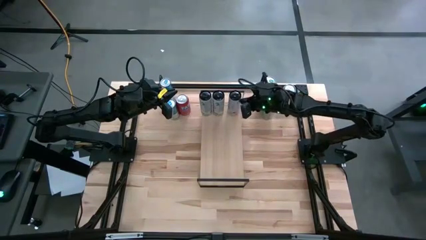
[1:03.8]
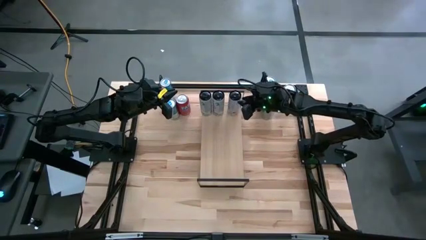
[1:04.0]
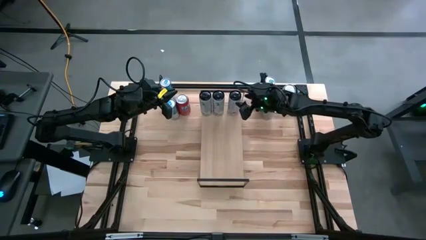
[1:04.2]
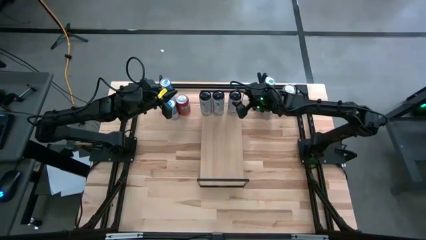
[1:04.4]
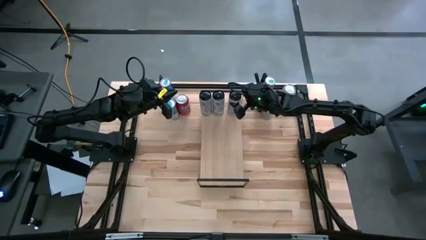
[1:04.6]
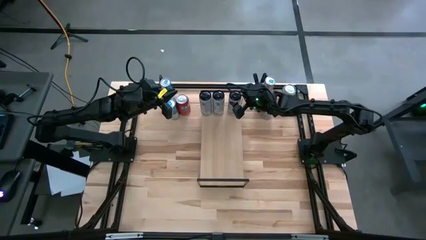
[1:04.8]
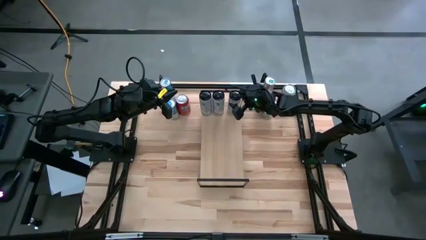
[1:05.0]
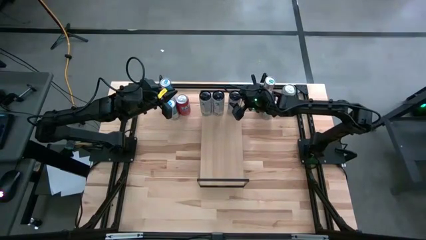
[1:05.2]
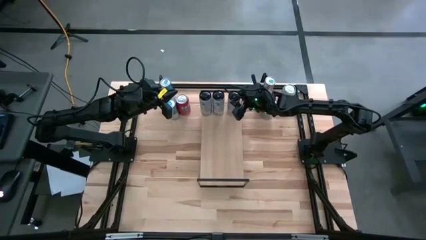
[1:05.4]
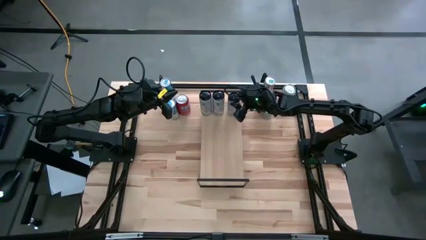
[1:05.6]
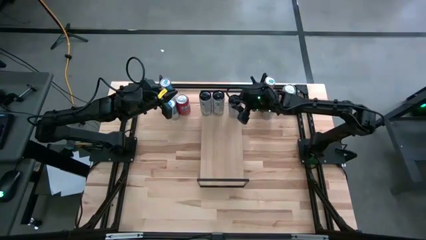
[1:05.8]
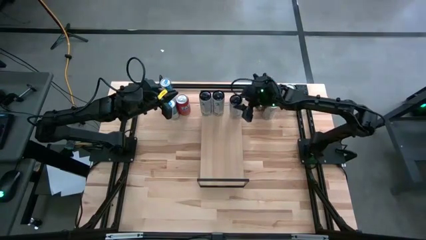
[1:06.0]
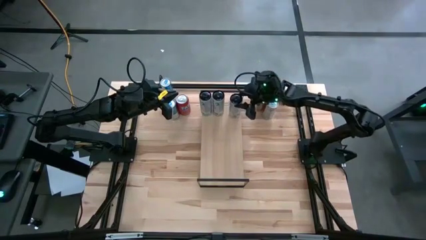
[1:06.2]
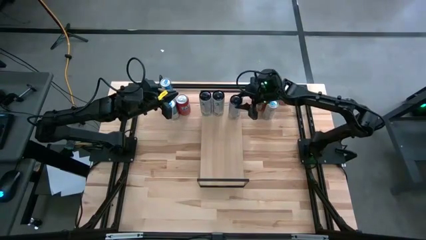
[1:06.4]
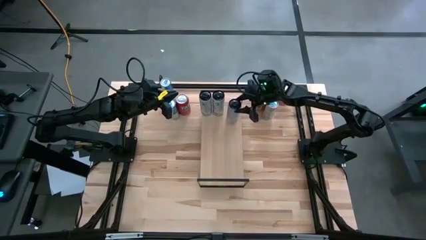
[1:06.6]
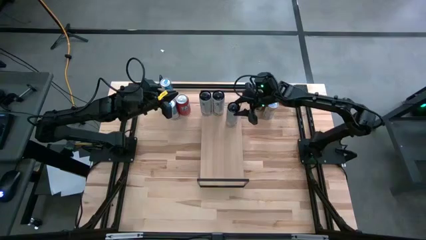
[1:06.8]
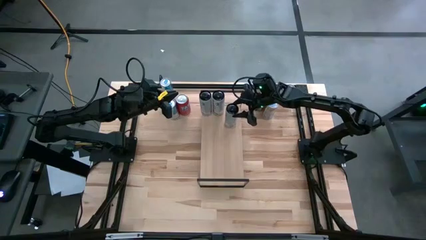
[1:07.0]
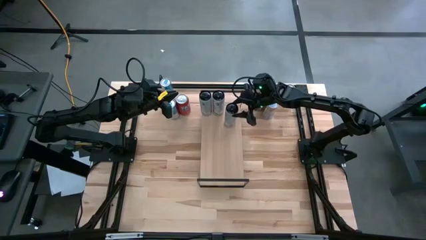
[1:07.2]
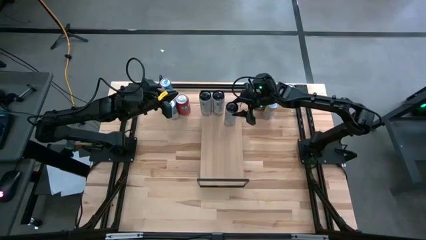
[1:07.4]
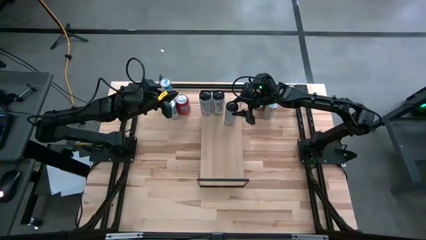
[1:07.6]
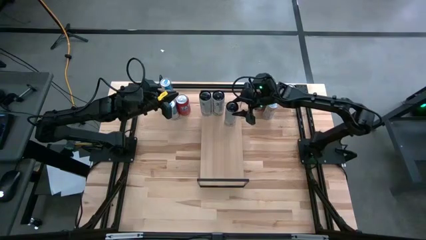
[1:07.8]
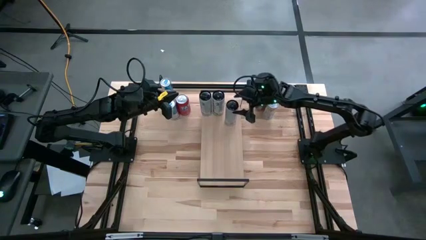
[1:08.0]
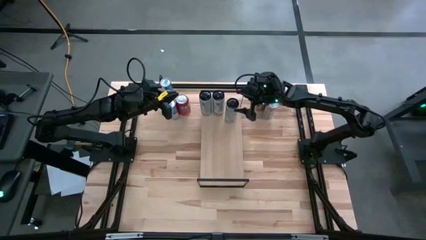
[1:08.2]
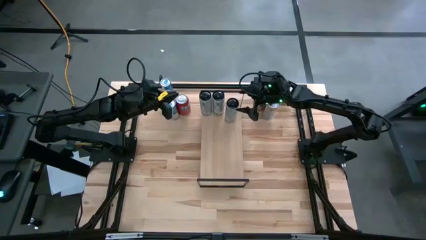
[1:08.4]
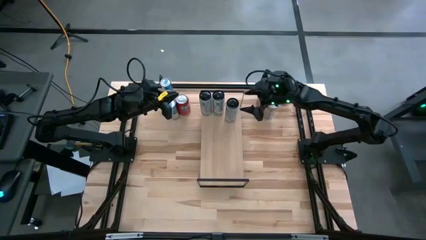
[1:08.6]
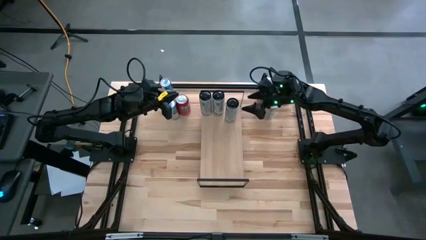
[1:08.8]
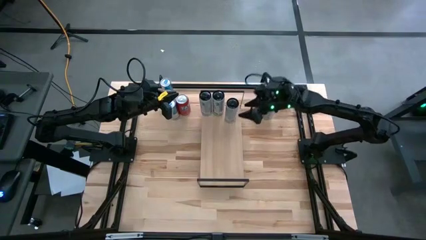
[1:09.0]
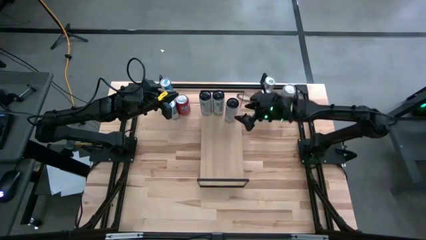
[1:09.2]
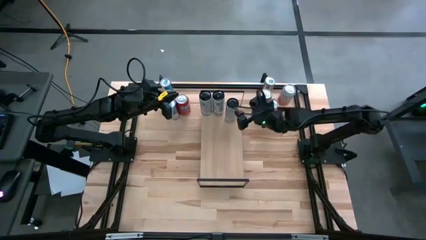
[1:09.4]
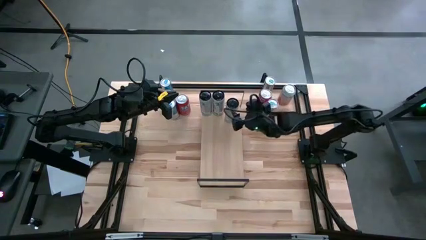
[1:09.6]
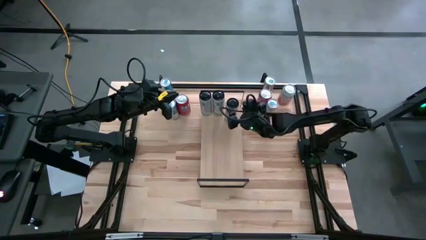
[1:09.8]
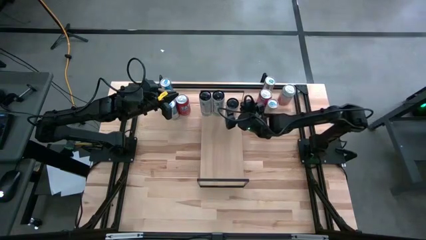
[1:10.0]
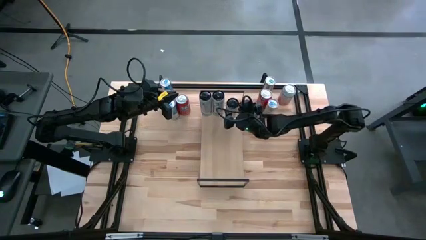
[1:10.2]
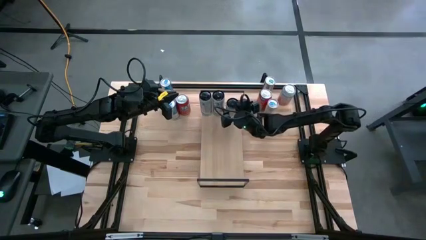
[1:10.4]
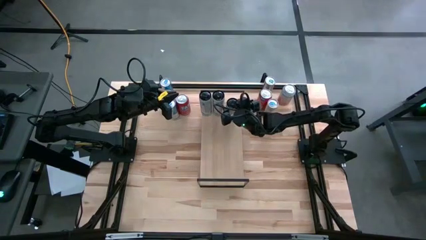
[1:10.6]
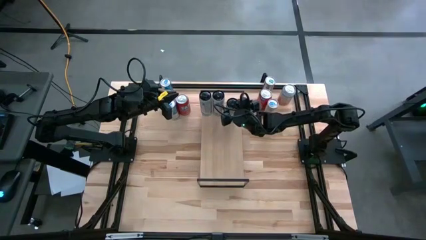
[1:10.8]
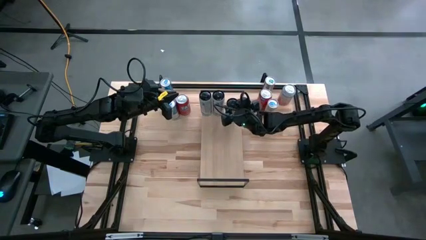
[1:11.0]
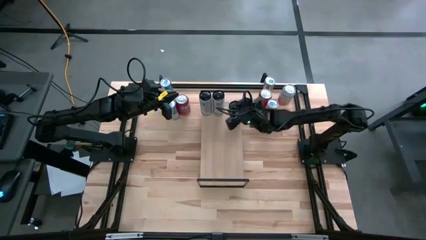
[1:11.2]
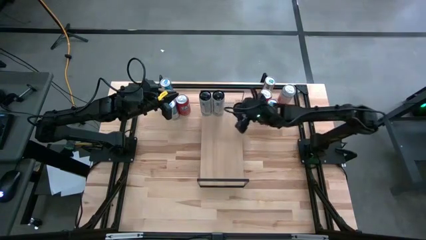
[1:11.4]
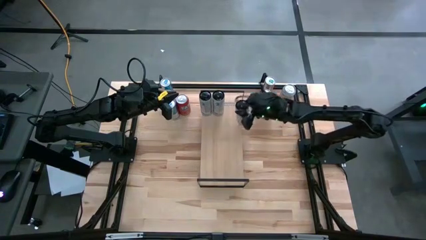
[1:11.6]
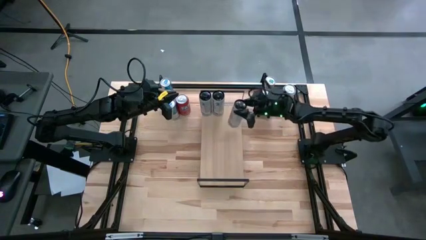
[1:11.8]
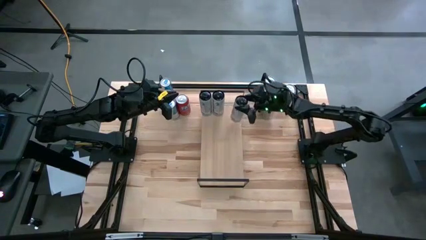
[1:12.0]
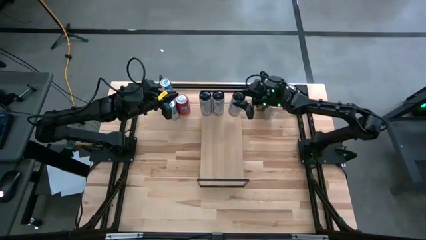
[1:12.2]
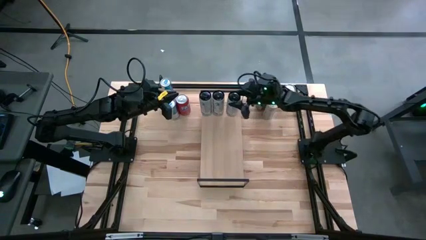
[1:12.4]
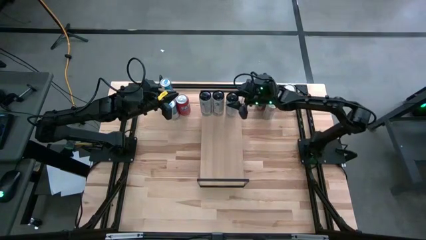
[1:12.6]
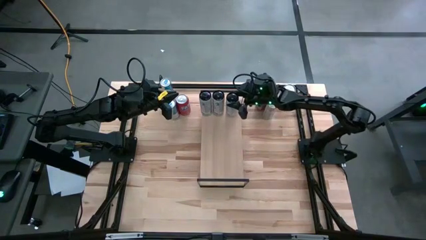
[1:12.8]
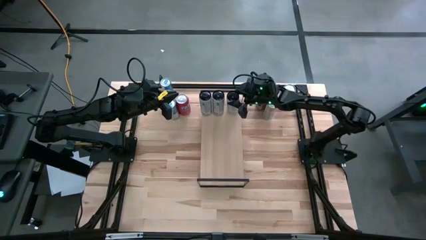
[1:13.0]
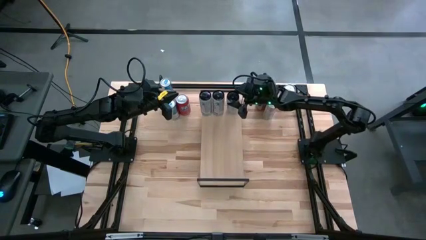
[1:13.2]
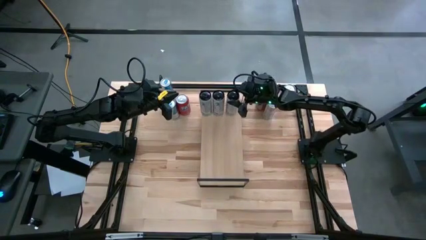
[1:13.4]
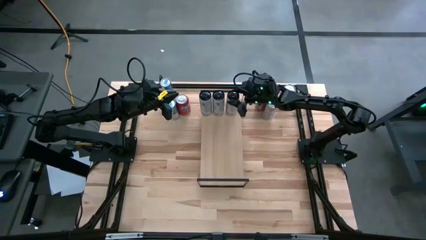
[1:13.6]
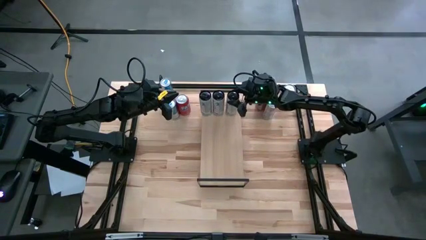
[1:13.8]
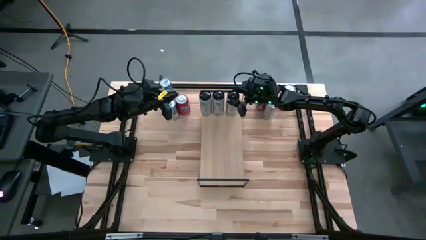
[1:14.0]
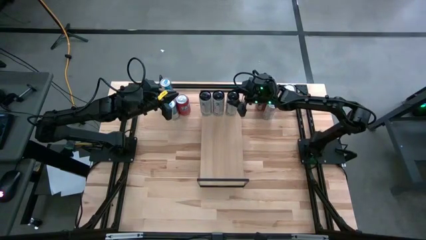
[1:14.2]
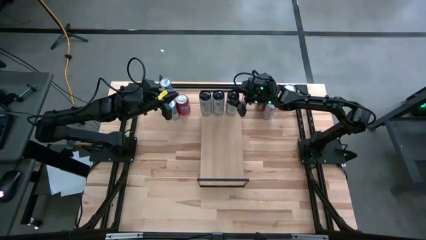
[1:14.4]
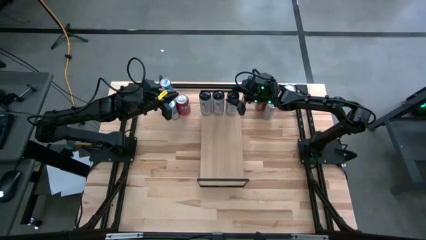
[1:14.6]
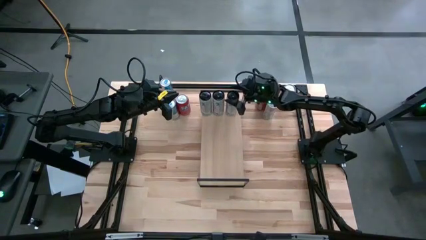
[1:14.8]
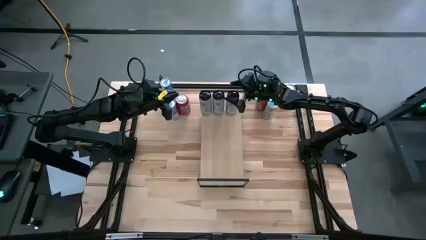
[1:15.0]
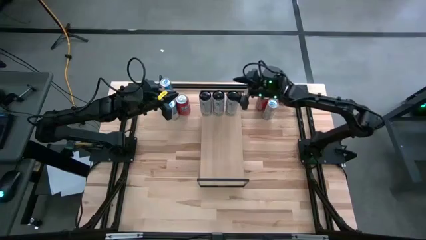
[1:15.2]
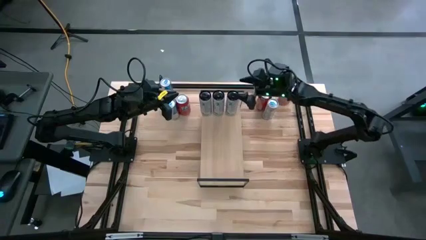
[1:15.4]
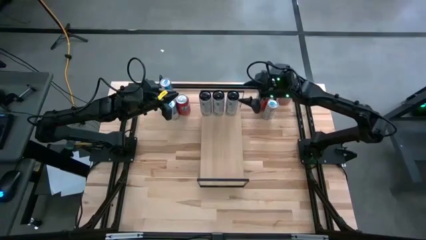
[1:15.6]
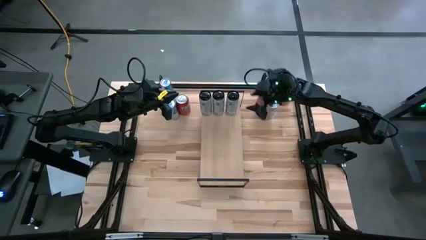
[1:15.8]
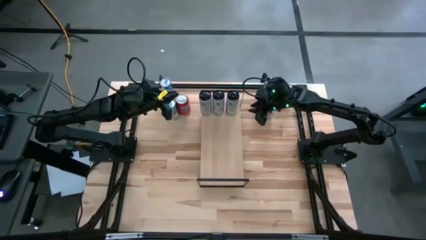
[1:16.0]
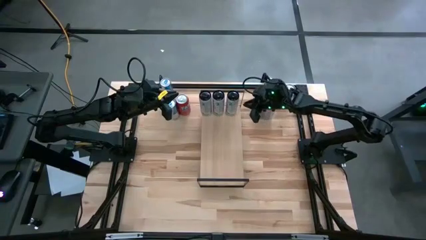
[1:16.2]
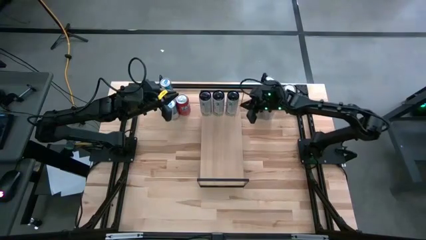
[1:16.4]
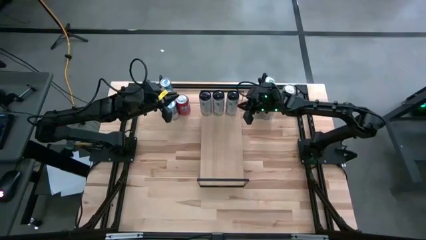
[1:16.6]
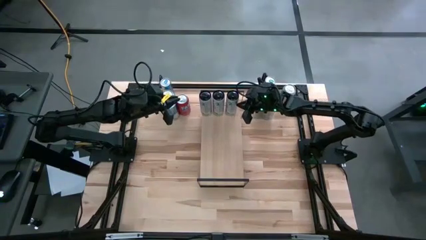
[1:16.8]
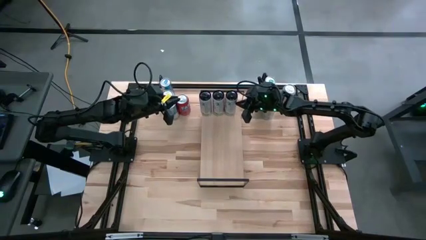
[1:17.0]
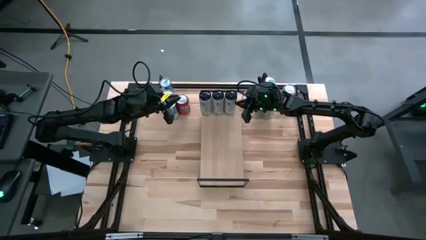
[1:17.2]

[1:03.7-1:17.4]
Task: Place canned beverage on shelf
Put the white-pink soda can on the shelf aligned with the other white-pink soda can

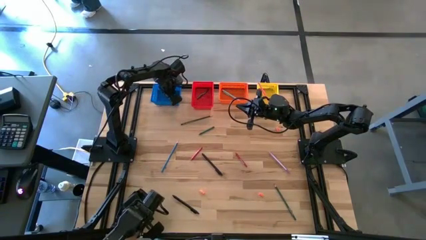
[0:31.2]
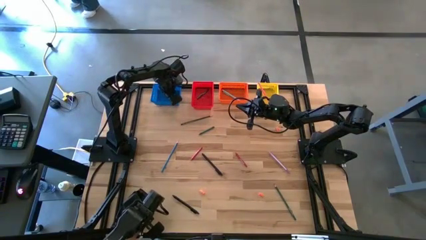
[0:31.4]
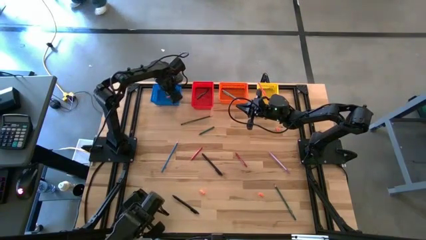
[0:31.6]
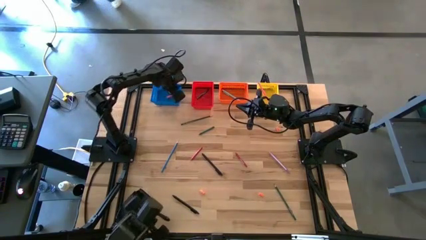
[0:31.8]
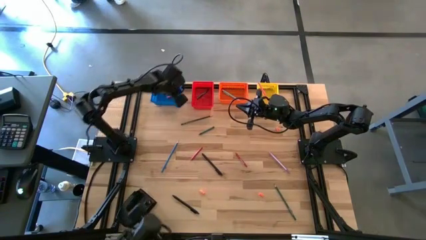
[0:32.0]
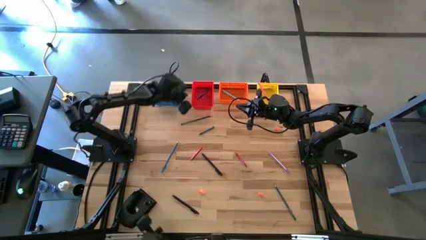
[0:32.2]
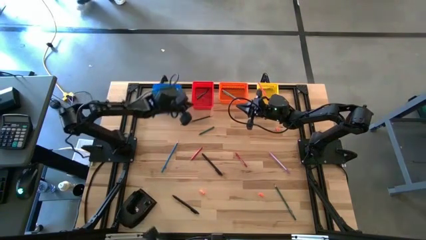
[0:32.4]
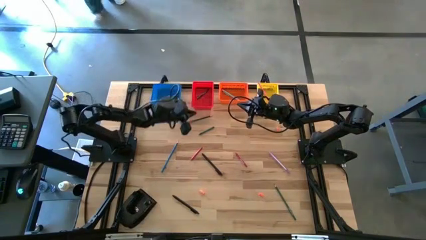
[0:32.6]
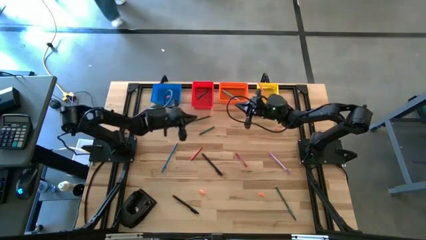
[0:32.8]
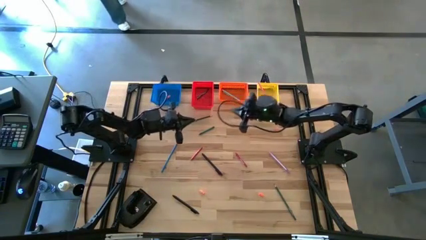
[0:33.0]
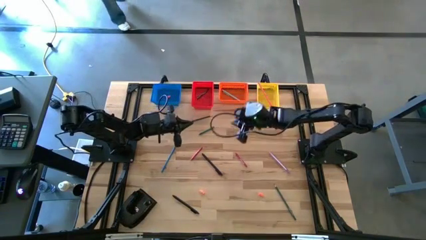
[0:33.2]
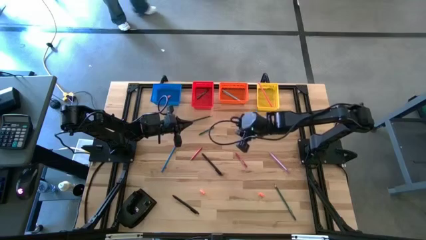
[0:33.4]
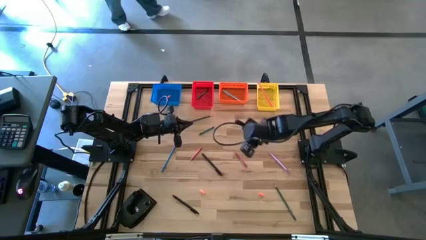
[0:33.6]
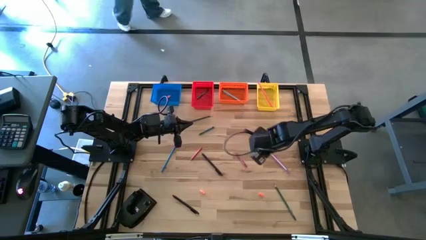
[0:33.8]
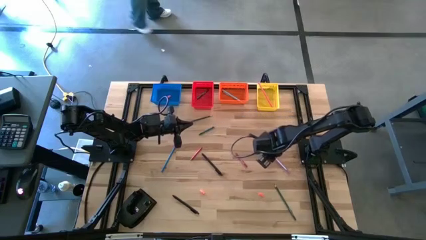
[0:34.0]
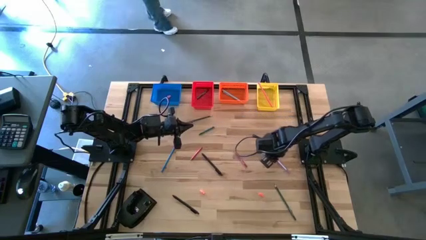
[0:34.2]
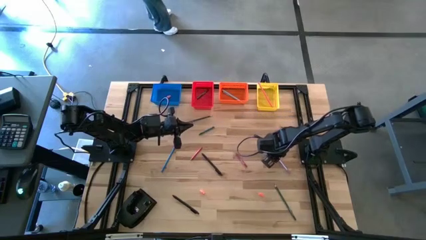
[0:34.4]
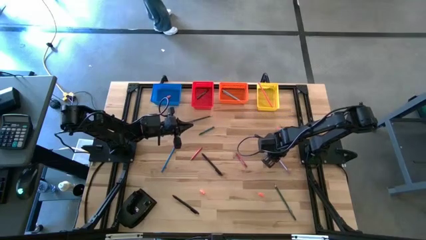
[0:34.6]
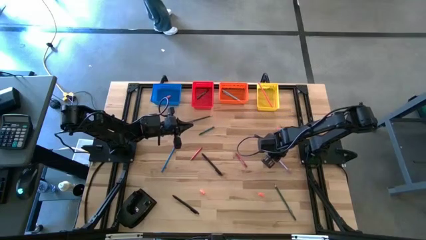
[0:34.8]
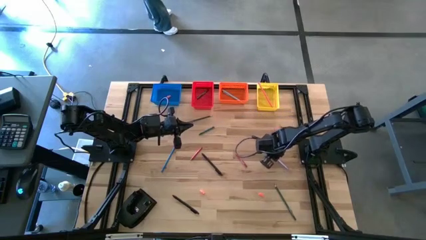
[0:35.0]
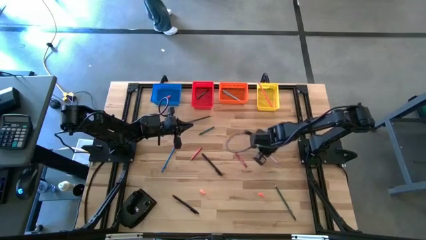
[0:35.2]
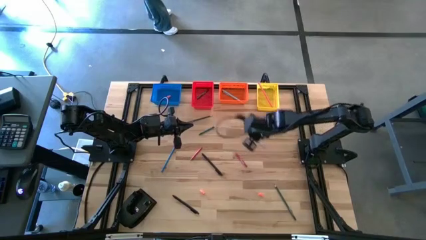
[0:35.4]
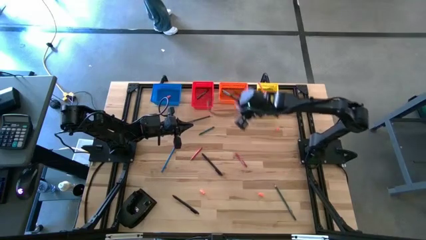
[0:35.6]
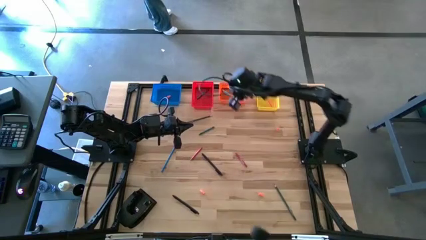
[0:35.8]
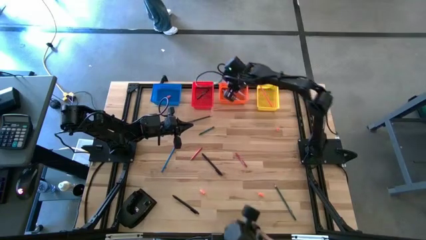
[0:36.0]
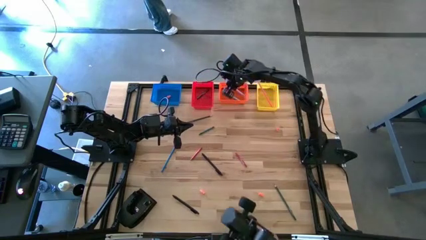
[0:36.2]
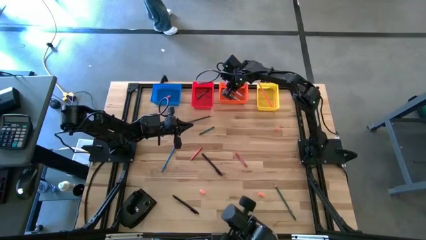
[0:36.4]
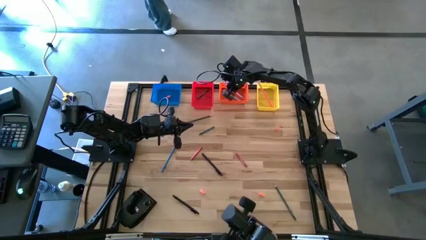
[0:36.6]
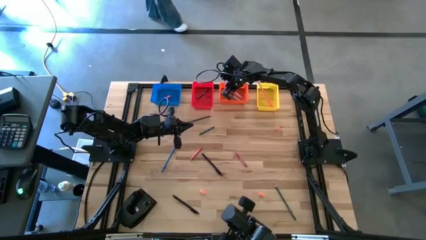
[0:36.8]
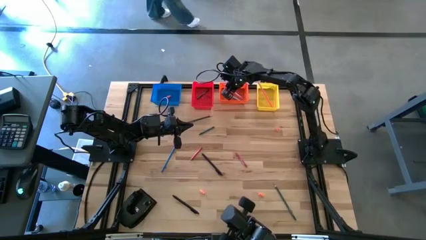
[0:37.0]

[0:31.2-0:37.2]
Task: Sort crayons/erasers/pens/pencils in bins
Put the purple pen into the orange bin
